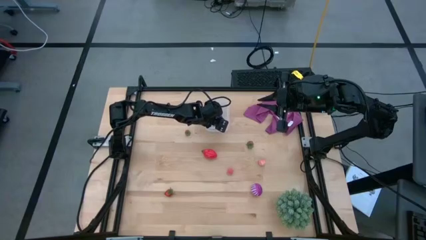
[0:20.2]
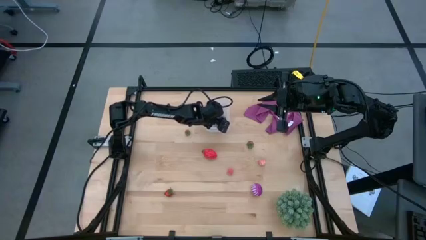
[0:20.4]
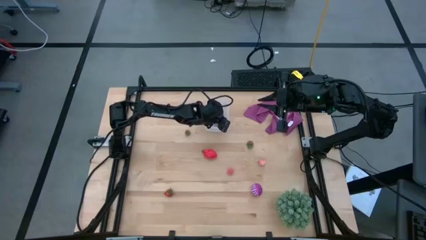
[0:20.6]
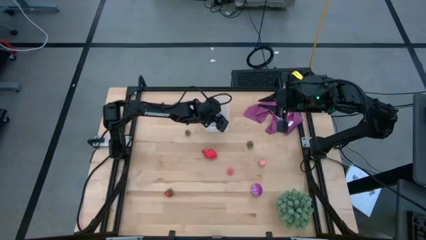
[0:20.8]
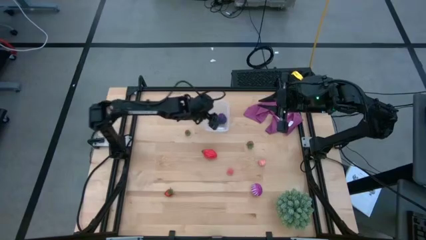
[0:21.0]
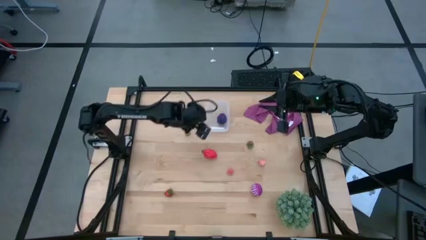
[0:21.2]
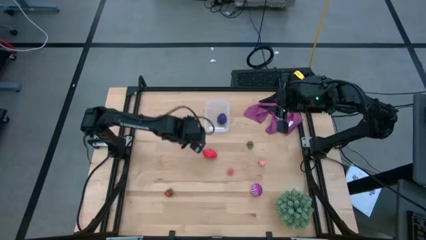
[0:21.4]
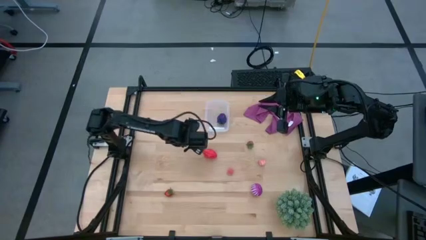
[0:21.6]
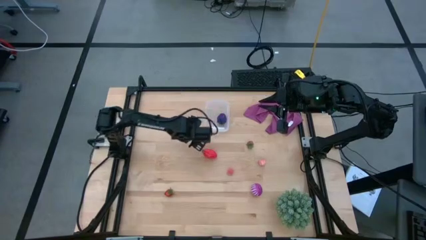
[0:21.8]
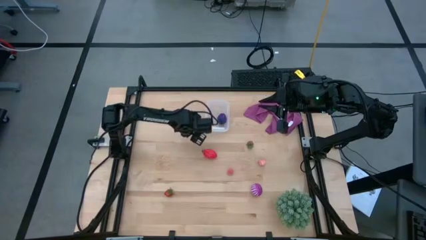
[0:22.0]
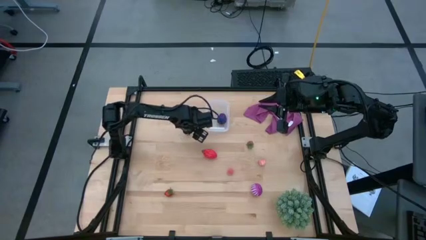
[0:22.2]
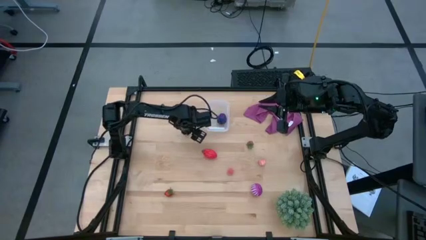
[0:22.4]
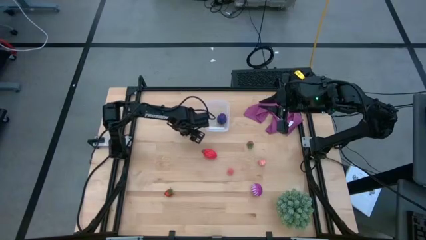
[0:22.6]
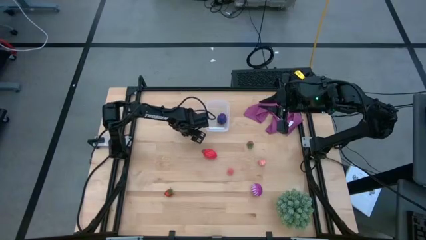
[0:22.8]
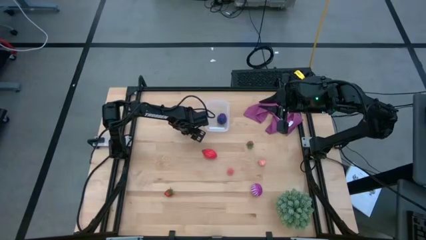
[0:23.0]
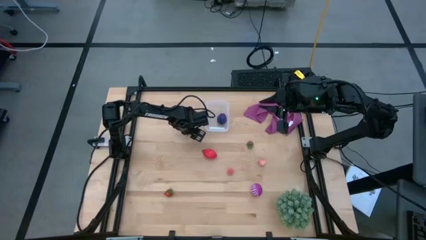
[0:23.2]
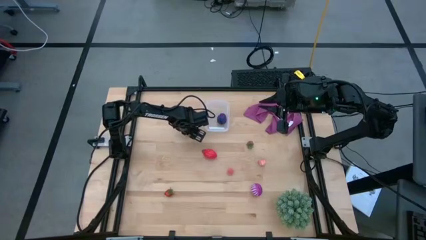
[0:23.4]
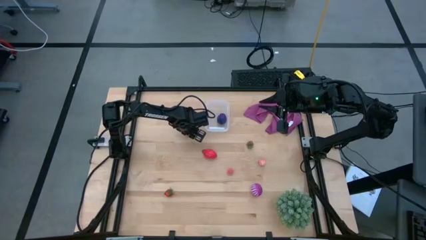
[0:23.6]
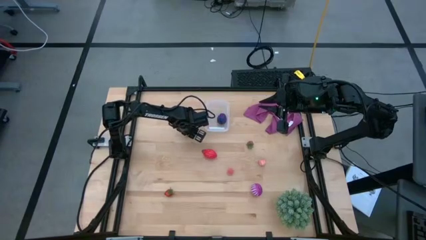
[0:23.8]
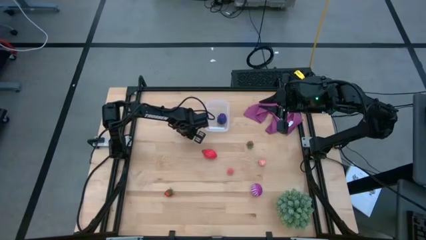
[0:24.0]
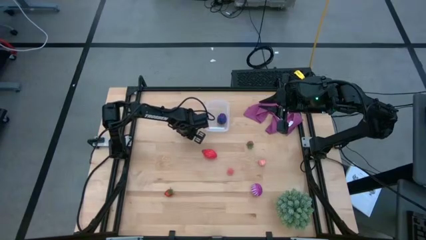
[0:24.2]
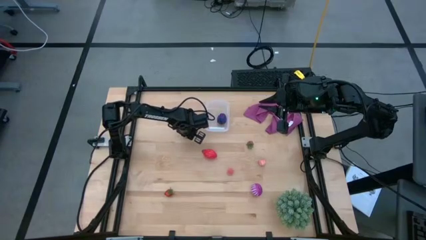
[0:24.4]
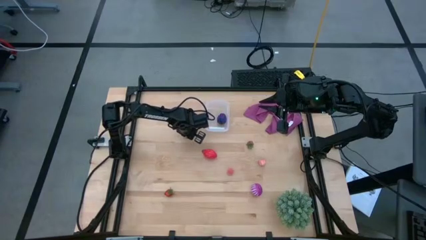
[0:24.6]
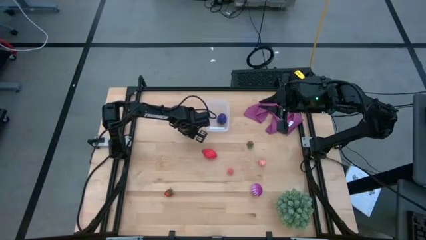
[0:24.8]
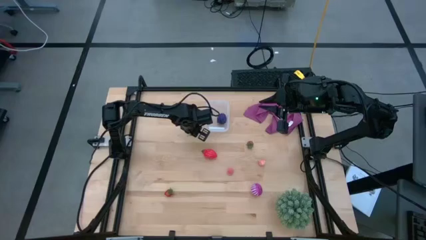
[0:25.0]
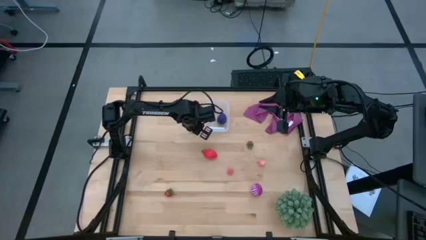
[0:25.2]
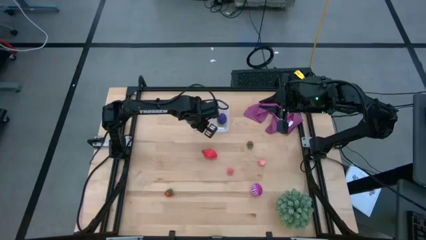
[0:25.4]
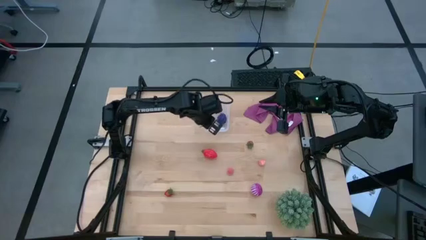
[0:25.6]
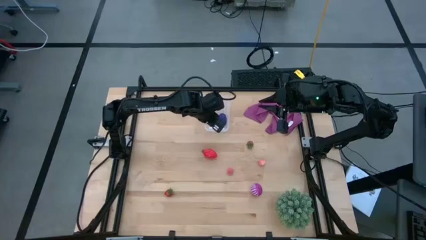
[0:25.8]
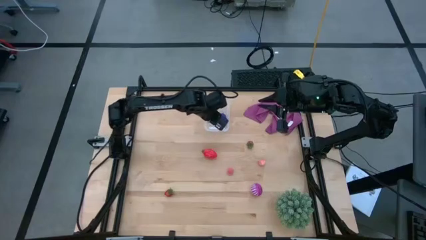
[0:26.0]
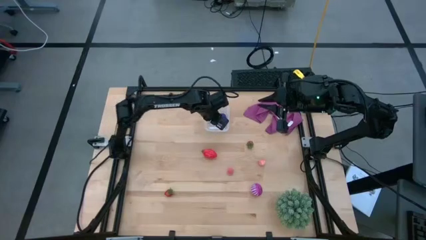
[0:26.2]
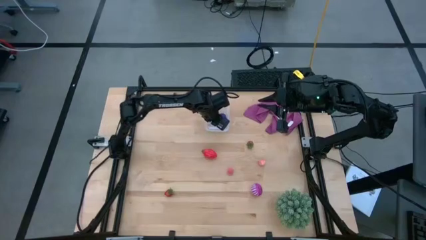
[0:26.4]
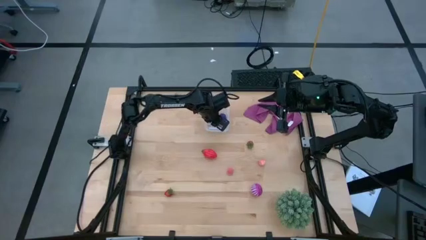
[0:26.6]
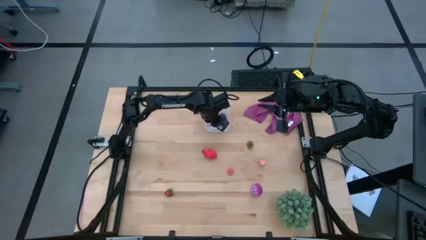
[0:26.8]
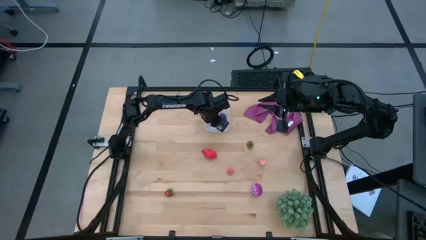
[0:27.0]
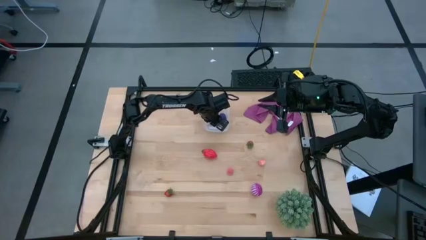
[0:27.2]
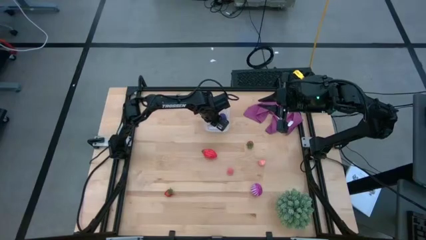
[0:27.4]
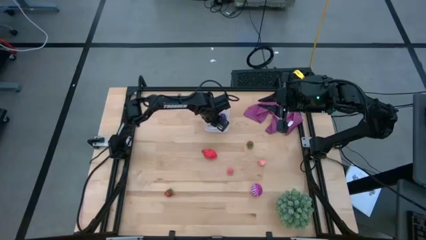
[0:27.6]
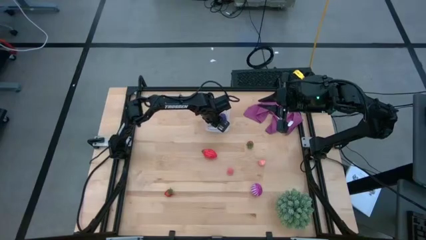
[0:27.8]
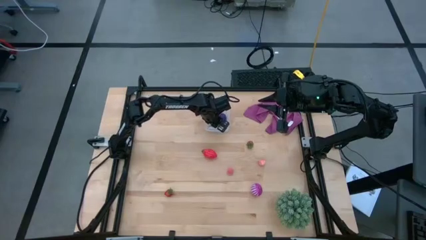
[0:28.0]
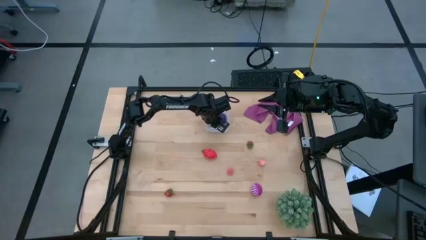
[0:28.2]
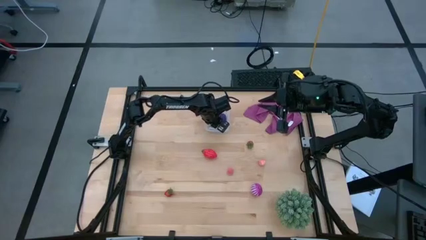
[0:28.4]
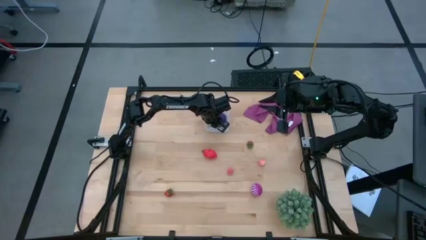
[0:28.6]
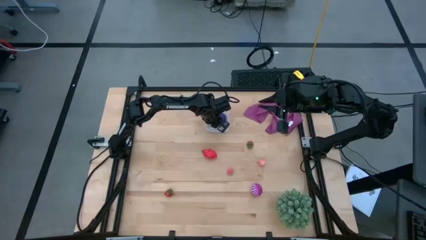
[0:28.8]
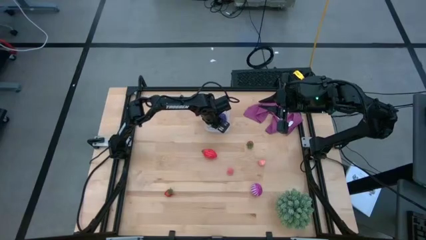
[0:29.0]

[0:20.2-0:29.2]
Task: Pick and placing Produce into tupperware
Put the top left red strawberry into the transparent bin

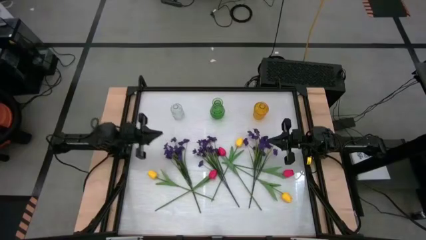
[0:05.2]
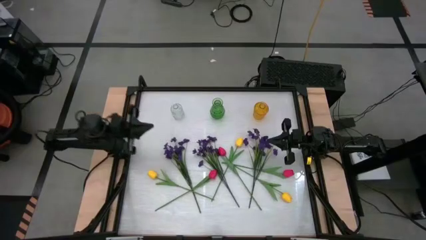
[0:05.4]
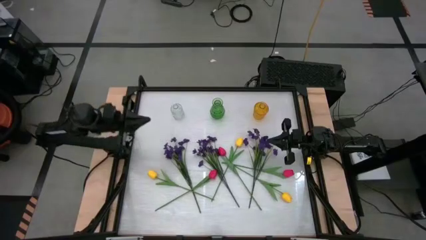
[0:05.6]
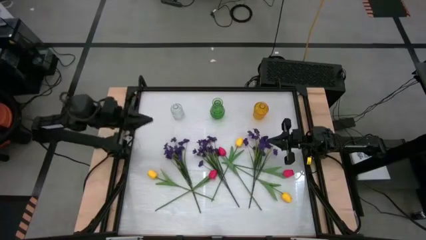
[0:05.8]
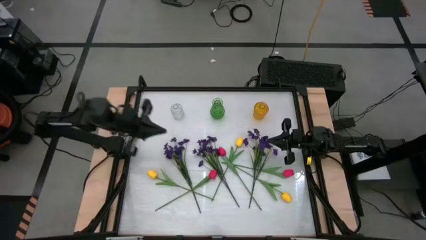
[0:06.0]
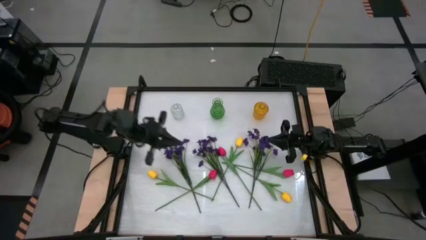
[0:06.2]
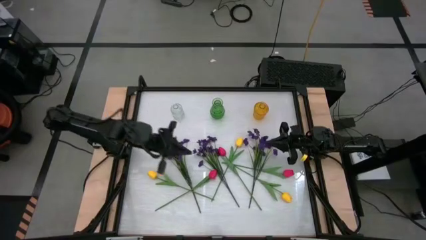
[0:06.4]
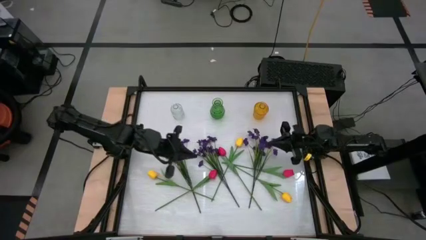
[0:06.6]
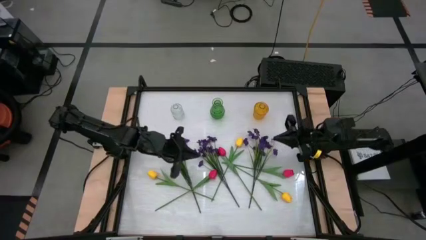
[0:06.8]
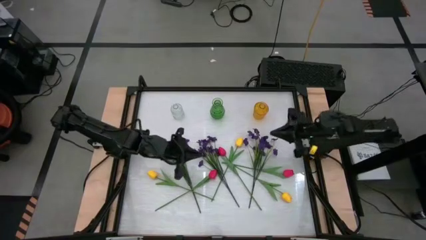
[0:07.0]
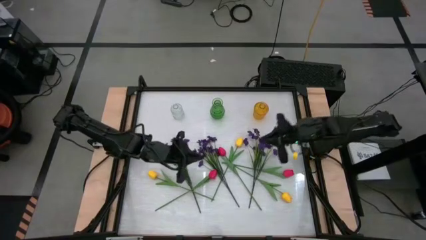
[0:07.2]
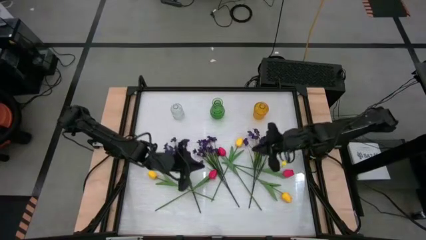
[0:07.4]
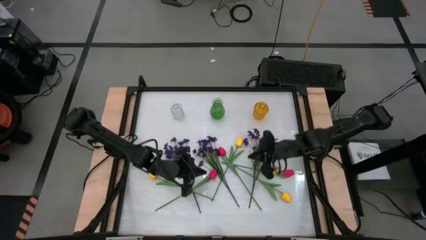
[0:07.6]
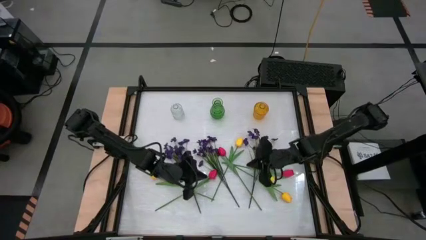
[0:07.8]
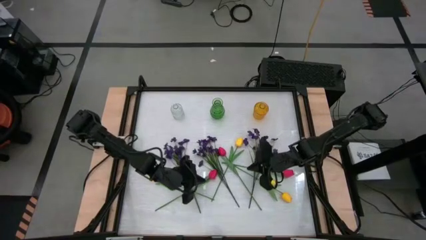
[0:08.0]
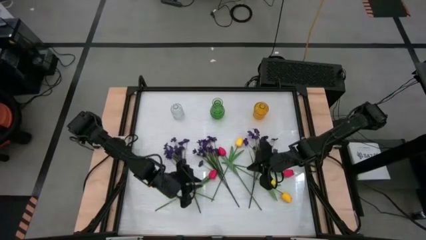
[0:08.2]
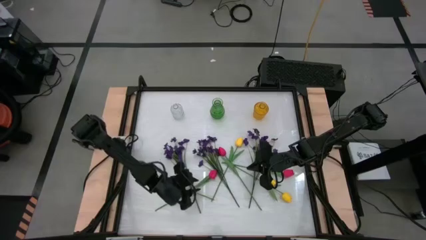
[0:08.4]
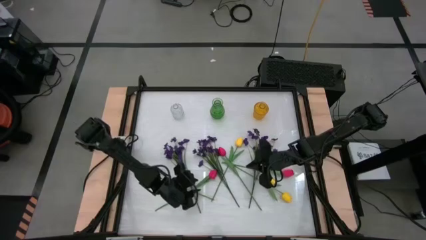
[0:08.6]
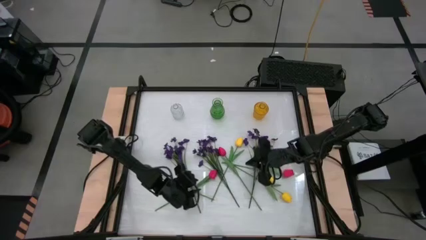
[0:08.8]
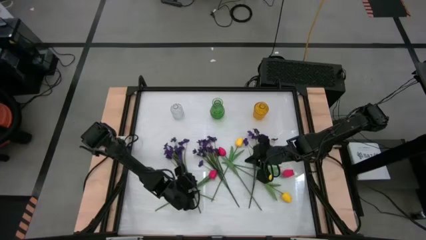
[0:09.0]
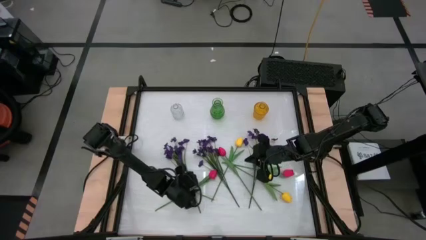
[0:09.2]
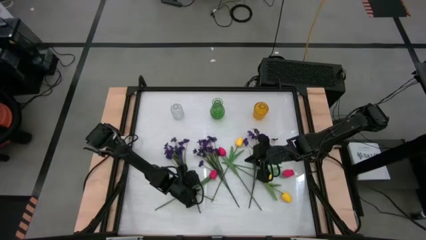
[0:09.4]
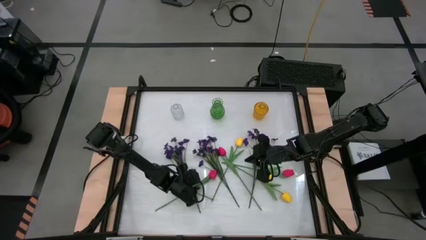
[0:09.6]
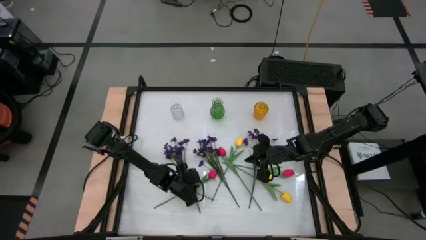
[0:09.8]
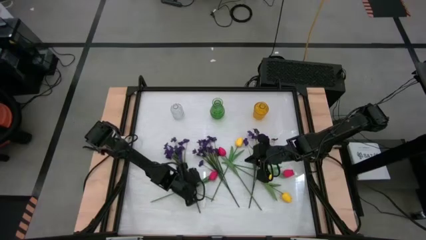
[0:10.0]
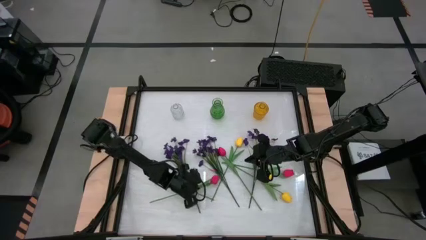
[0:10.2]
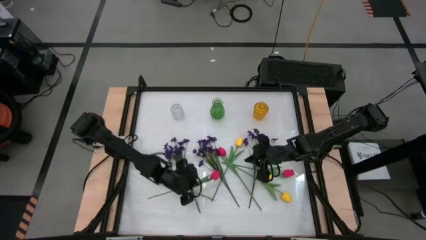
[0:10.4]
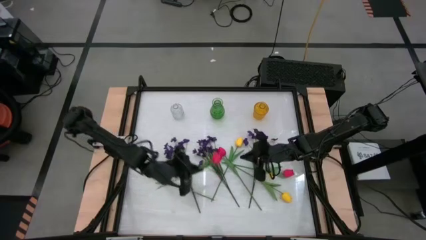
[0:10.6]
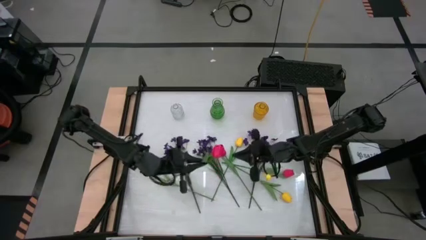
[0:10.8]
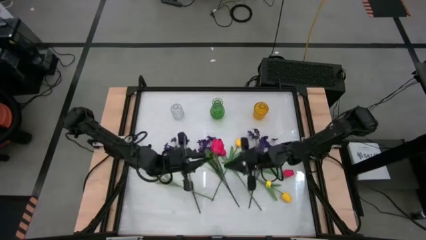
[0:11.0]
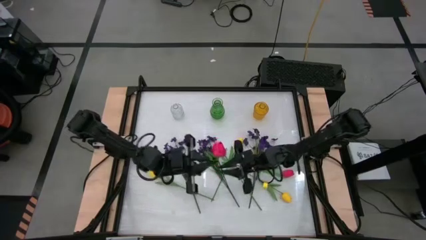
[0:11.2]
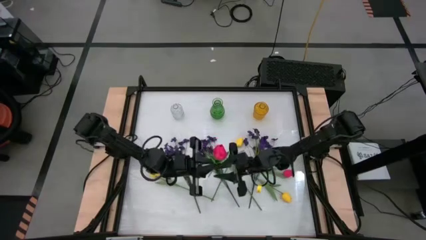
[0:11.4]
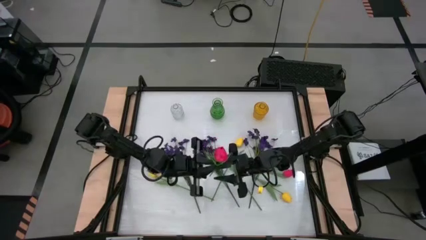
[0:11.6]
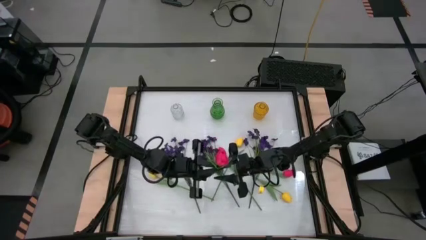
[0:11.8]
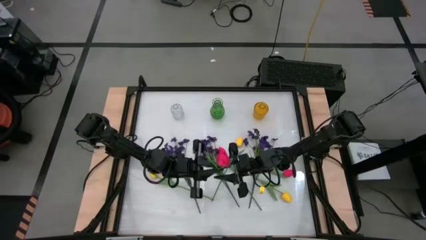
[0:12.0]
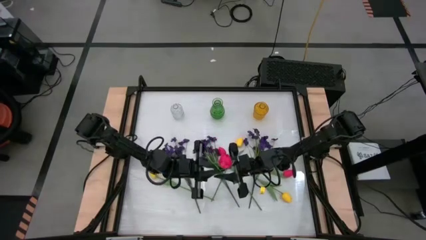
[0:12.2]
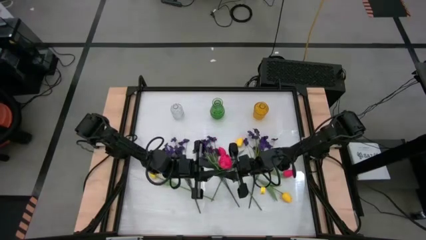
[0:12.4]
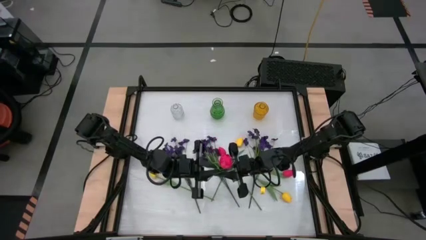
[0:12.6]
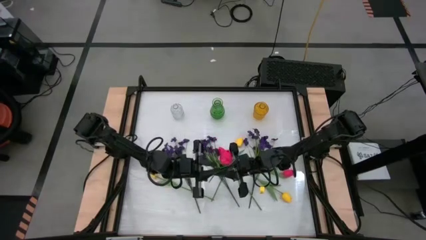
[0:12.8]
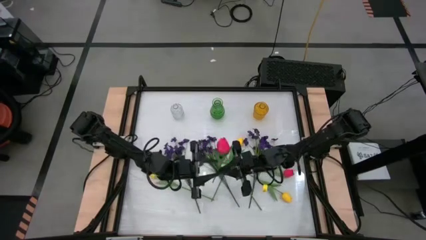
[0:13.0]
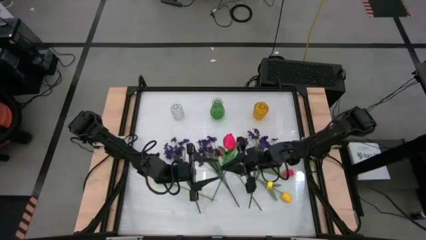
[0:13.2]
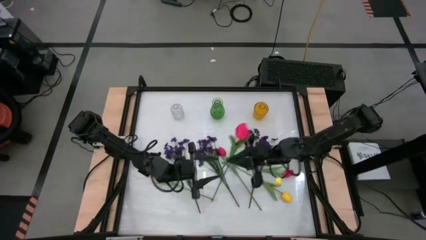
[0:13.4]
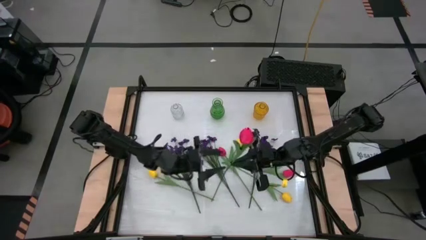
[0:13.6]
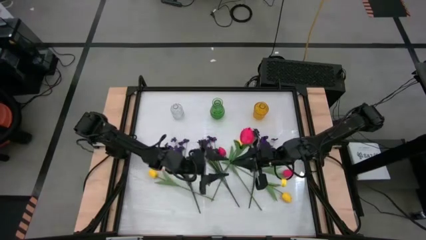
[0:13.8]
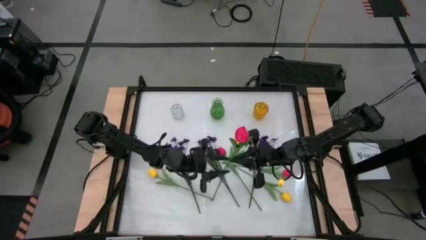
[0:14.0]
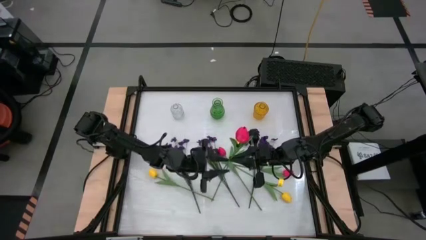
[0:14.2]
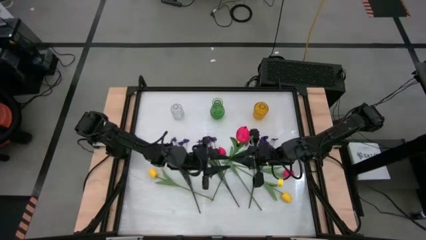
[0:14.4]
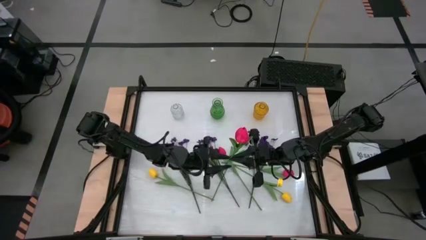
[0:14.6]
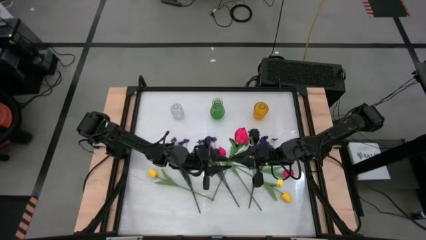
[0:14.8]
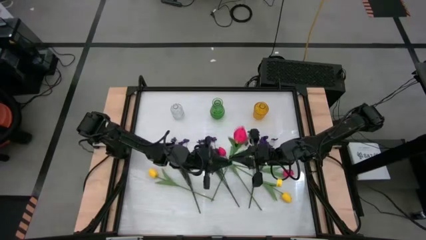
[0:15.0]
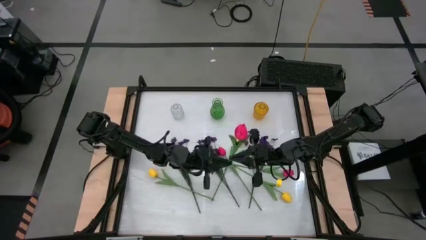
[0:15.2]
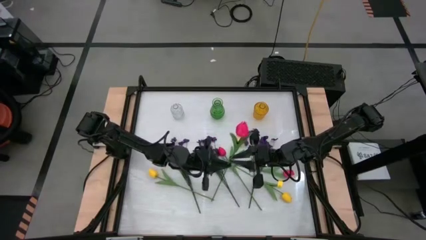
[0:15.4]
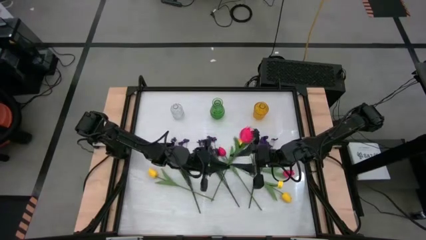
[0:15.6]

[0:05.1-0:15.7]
Task: Sort flowers into vase by color
Put the left pink flower into the yellow vase
